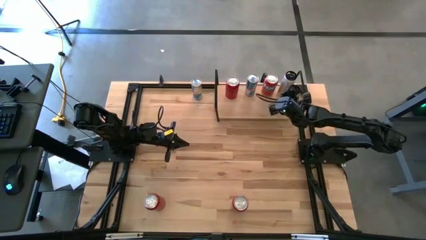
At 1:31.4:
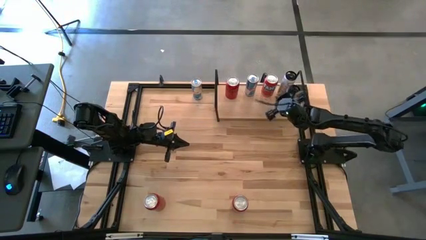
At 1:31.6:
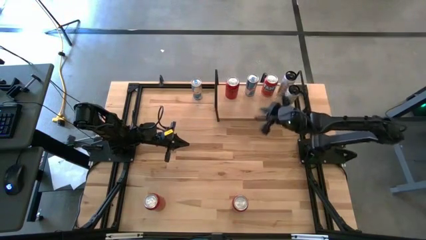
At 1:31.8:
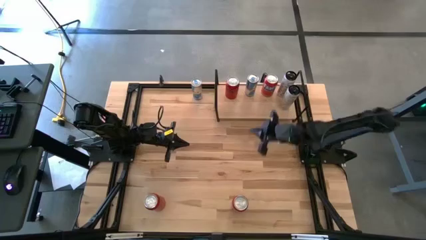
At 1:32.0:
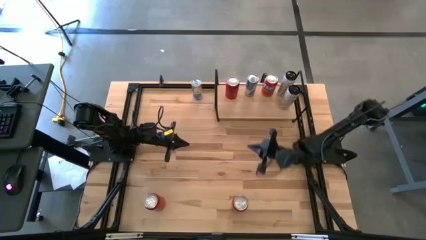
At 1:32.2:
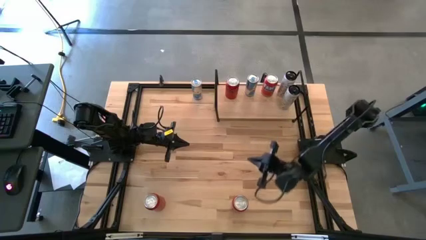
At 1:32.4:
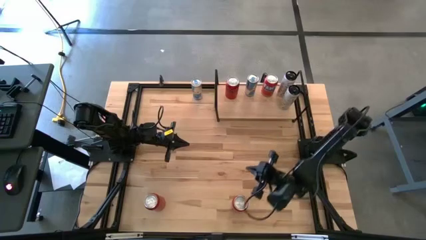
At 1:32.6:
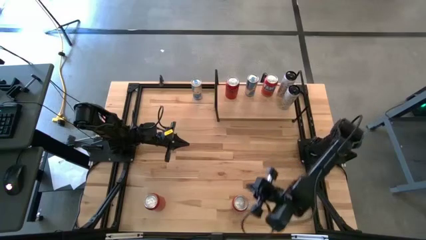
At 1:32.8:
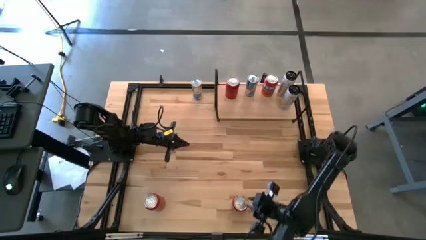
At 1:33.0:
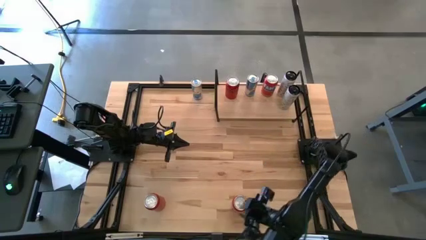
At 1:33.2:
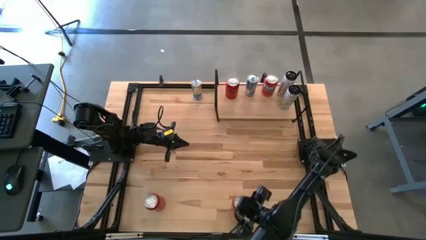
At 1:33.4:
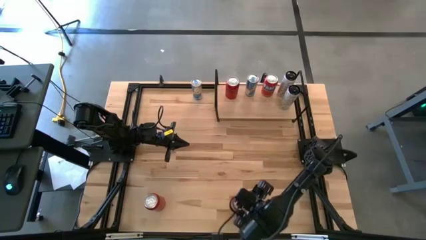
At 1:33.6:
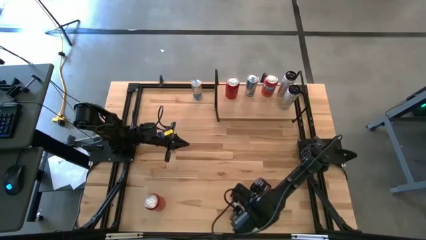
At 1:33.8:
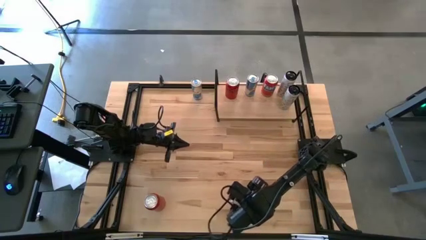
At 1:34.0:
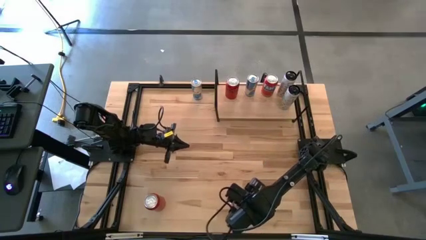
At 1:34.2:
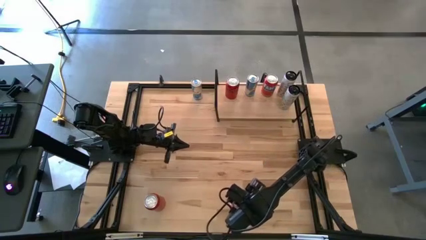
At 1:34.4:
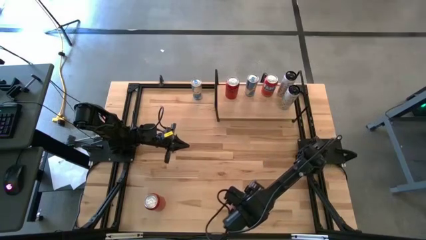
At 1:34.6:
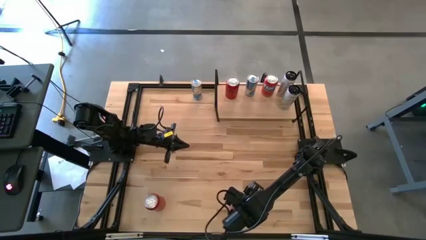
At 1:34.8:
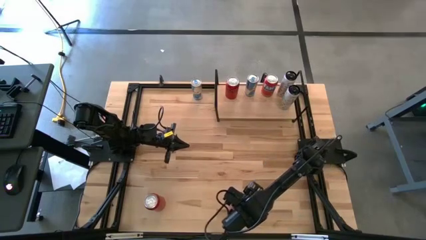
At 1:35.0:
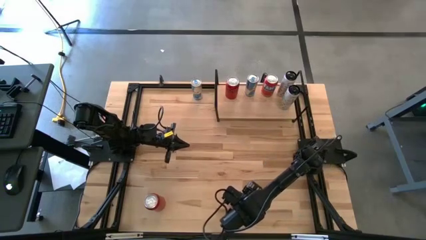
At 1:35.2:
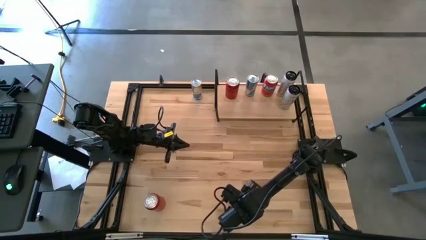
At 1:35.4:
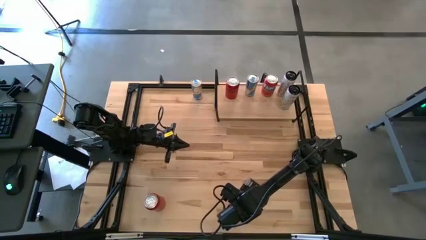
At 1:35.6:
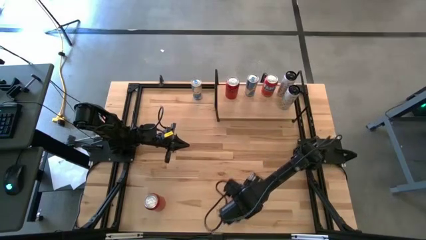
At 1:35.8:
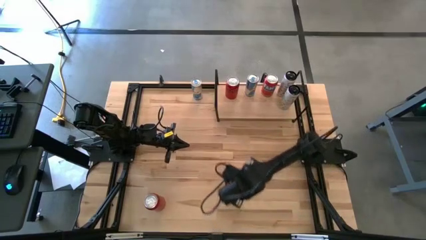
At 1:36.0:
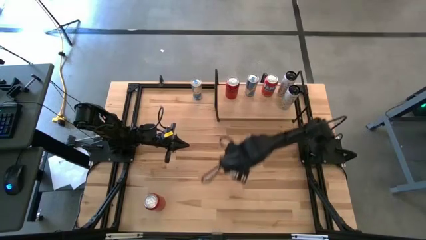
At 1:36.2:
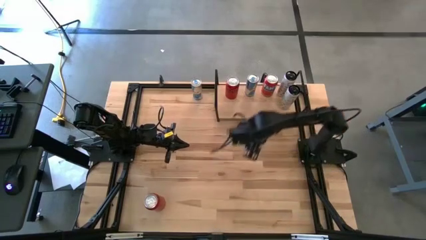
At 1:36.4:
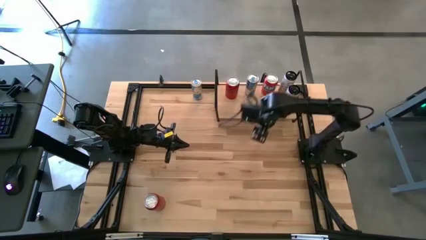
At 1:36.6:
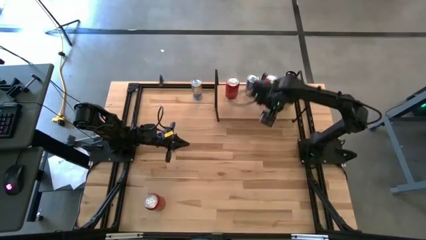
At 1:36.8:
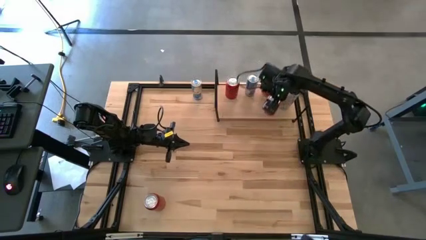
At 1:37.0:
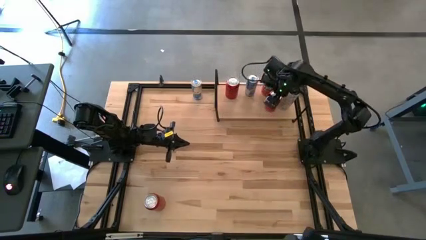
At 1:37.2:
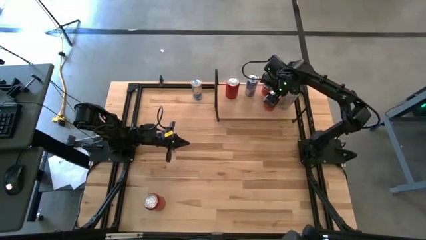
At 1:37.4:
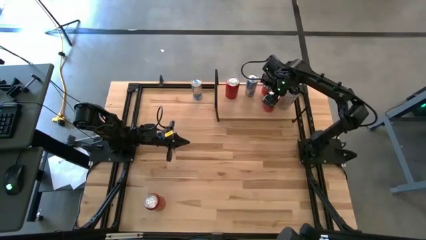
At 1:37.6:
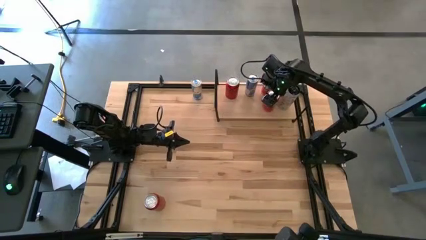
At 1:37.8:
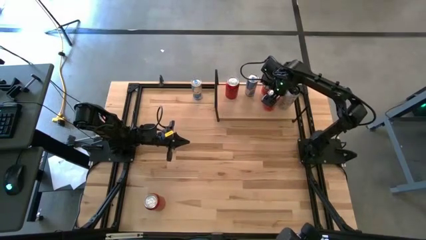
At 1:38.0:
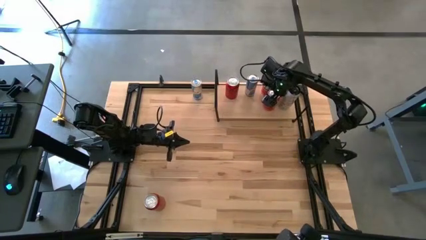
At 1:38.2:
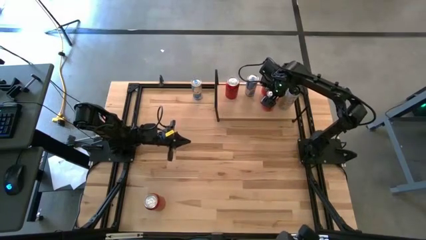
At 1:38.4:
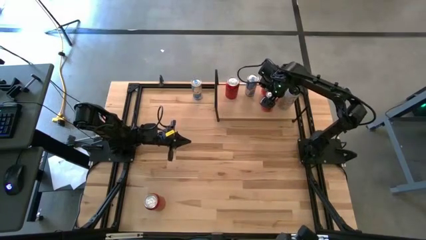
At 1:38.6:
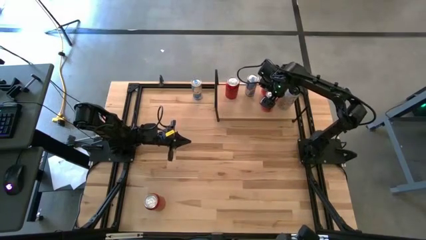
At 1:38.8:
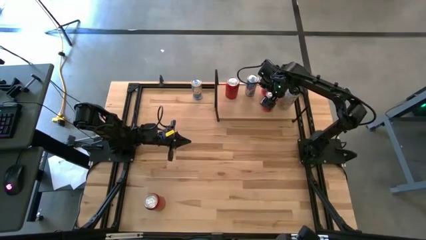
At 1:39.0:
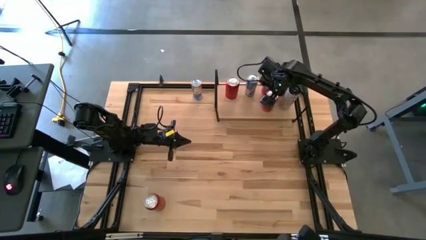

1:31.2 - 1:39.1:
Task: Place canned beverage on shelf
Put the red soda can on the shelf aligned with the other red soda can

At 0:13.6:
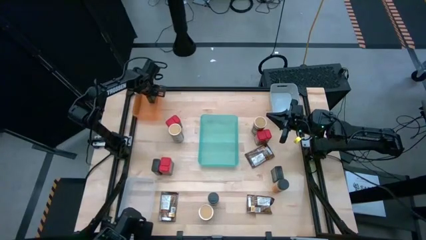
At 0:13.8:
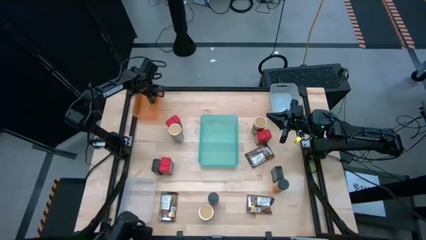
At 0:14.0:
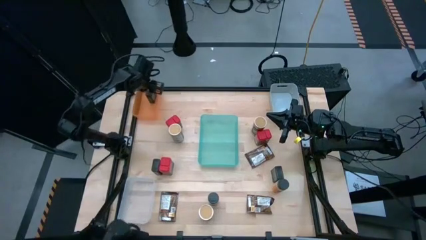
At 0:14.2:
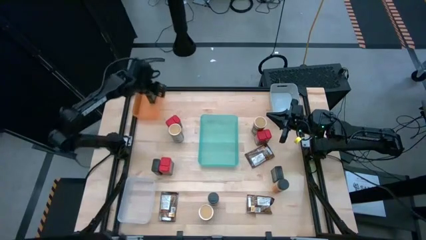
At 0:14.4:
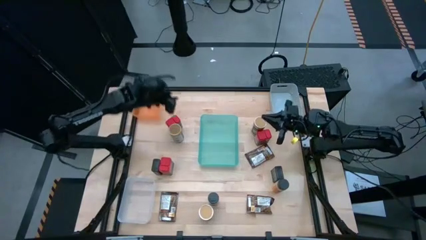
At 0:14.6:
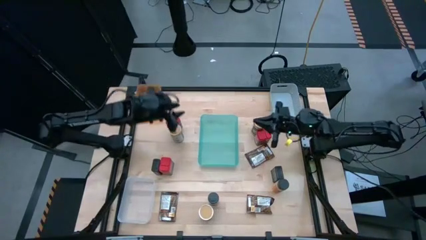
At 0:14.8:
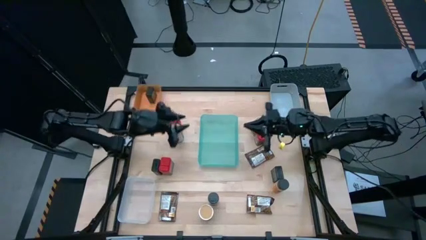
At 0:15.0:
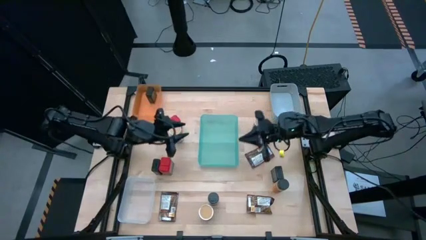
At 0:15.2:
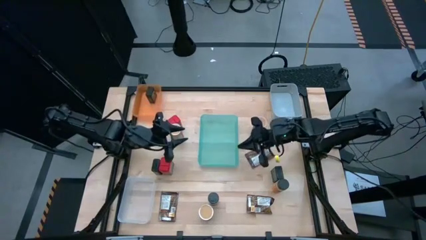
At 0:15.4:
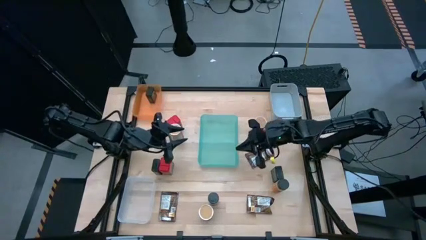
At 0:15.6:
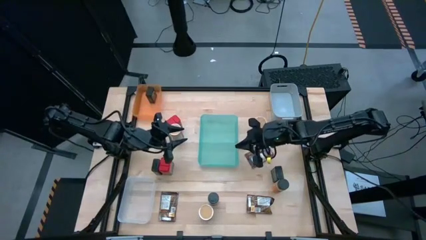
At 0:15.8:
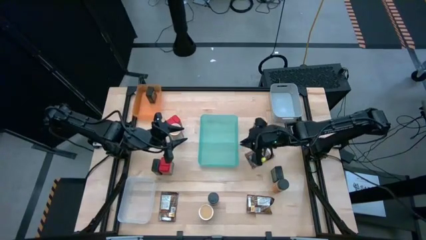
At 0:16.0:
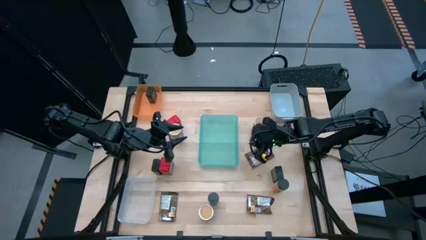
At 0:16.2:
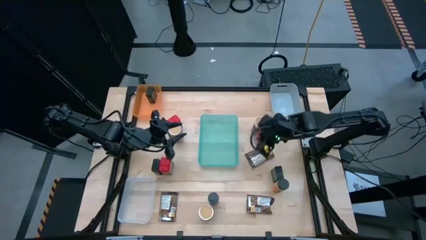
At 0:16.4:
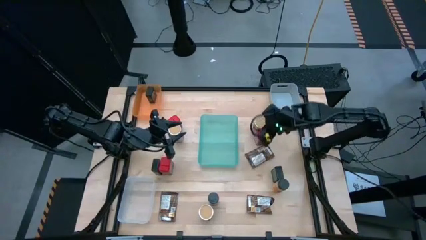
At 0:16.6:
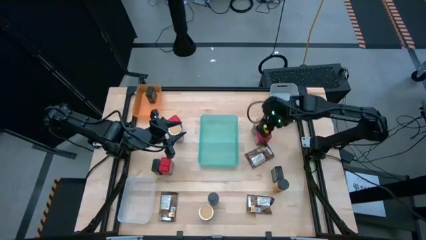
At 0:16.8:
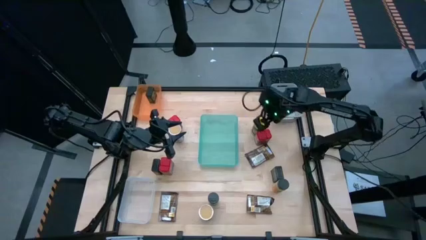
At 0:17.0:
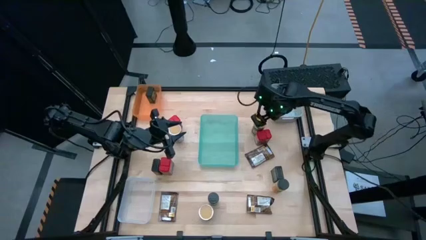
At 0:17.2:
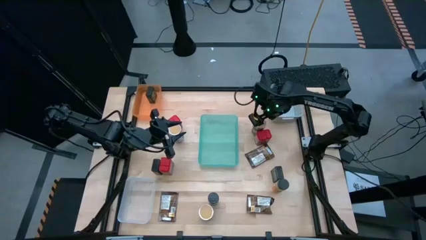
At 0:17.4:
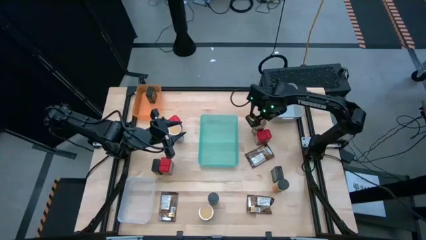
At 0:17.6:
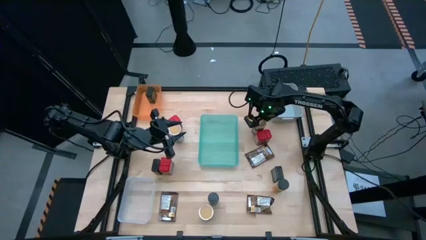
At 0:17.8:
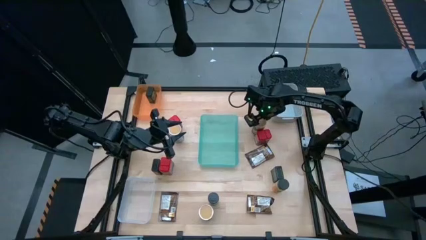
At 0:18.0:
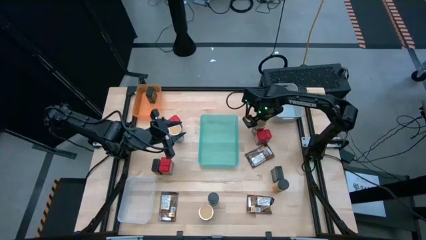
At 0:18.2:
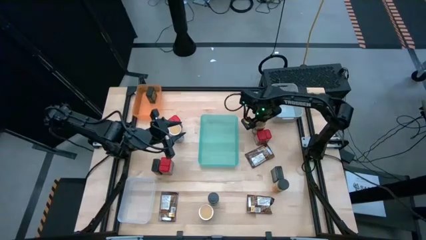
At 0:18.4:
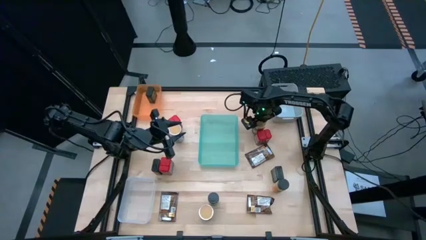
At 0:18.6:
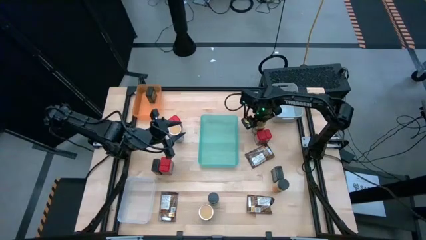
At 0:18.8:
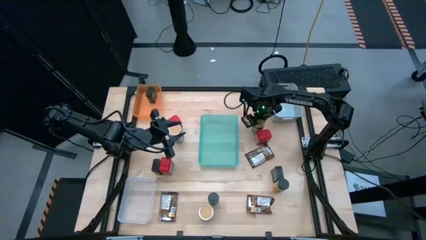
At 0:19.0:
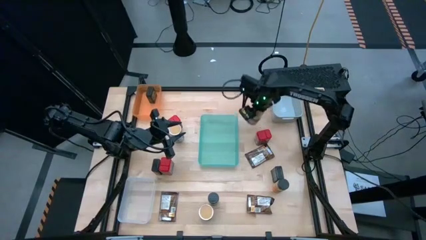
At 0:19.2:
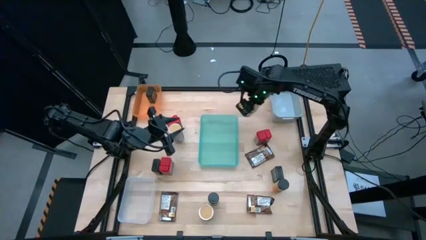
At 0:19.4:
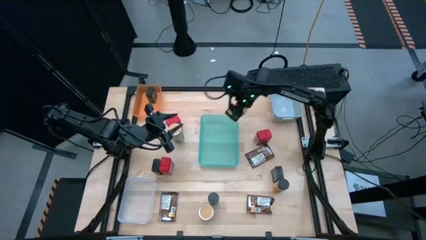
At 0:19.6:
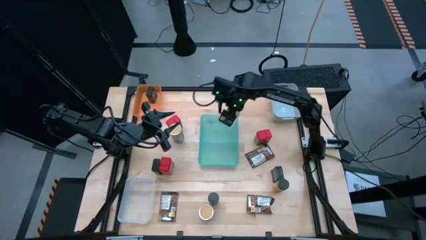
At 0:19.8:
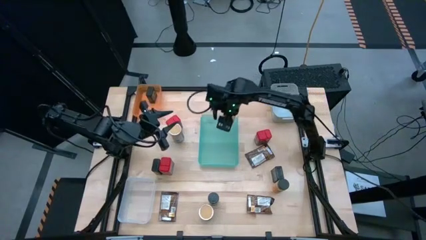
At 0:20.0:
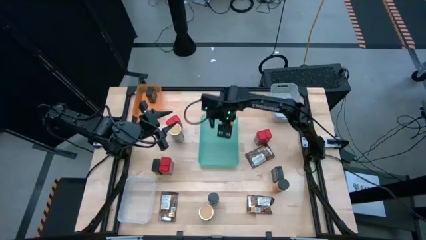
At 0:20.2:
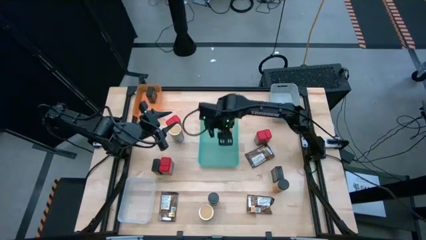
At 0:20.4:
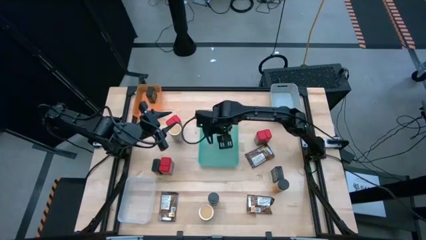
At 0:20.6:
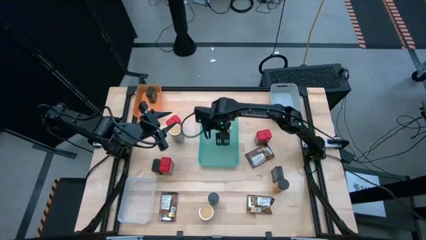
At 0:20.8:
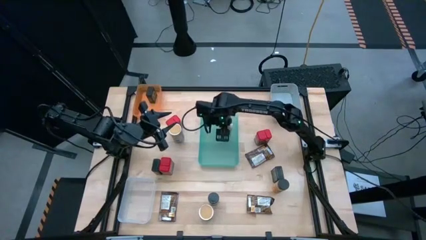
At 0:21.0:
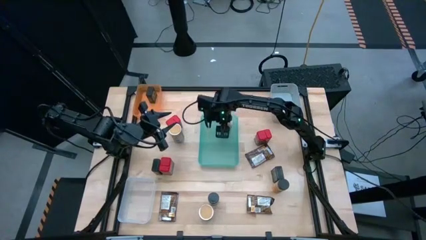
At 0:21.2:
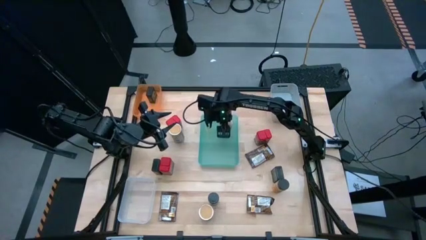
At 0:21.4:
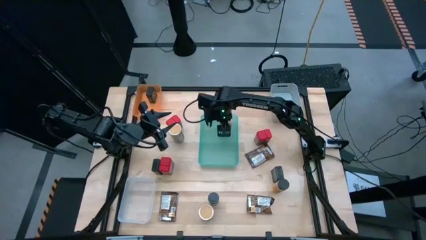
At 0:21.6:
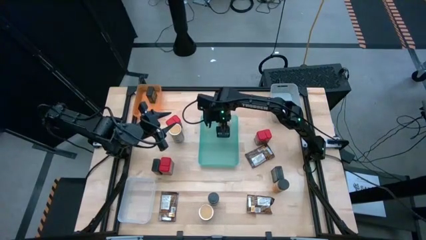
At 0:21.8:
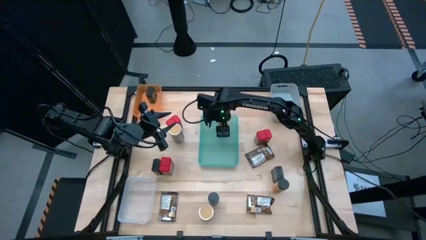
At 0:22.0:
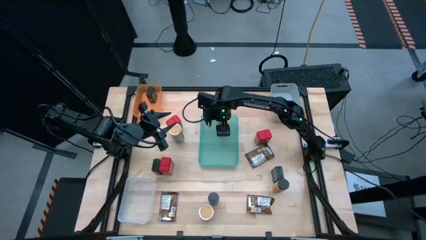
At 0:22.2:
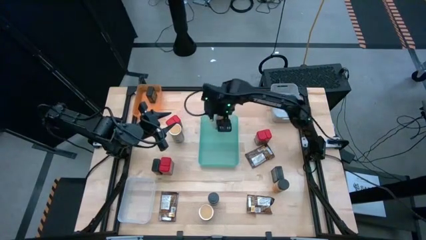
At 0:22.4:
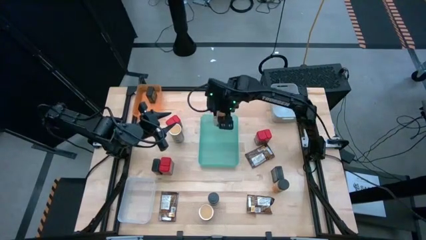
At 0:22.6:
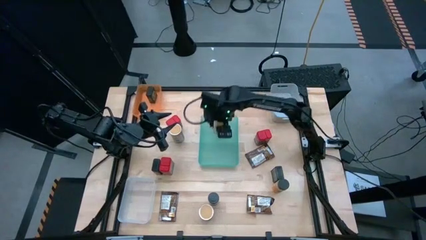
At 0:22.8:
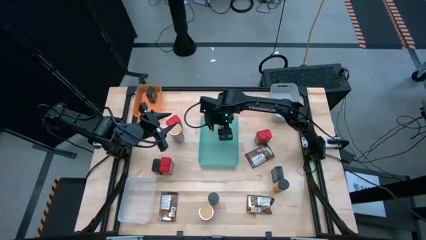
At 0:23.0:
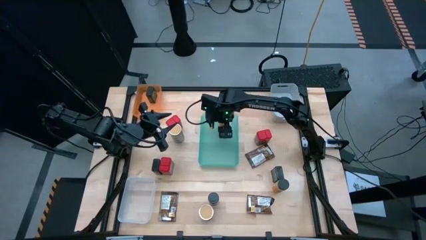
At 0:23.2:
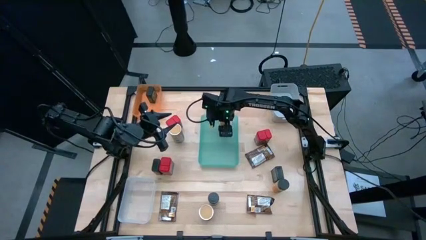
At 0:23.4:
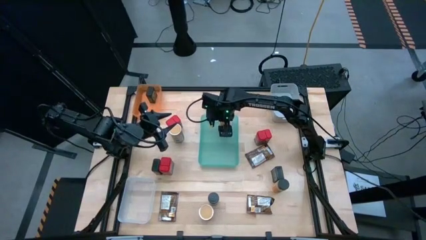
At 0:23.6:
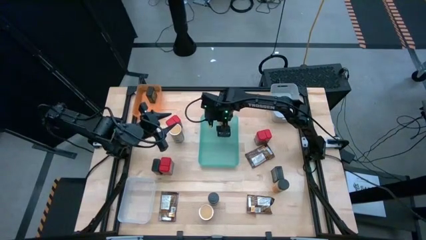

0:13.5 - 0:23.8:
Task: Sort spices by type
Put the top right brown seasoning bottle into the green bin
